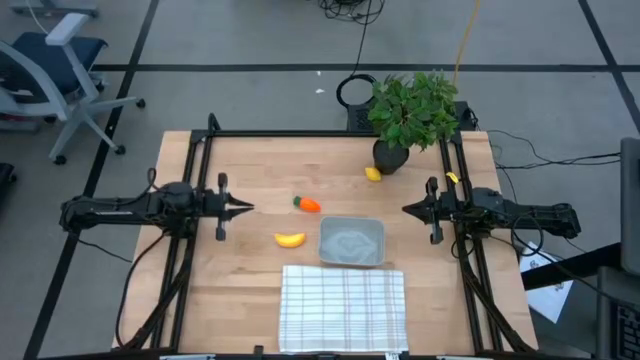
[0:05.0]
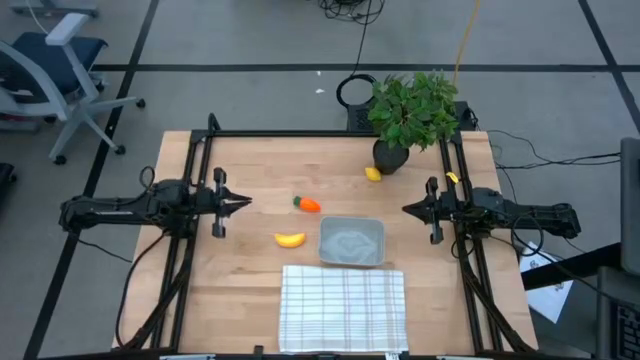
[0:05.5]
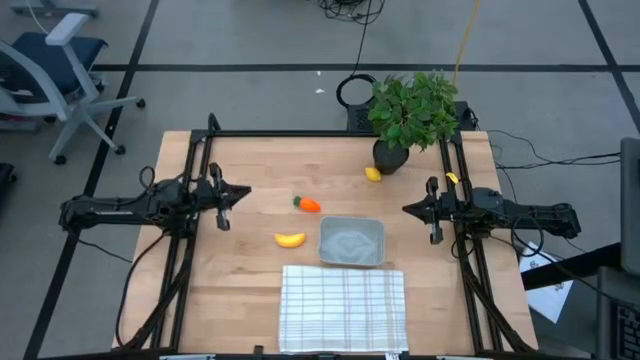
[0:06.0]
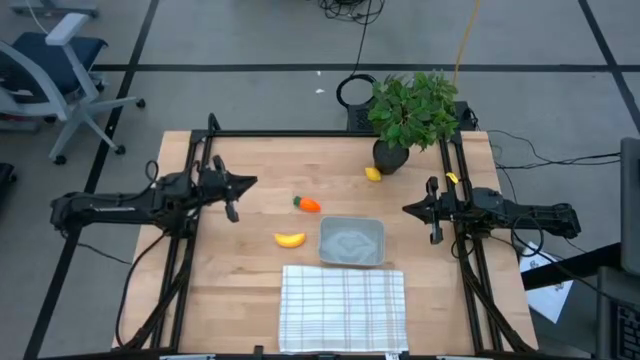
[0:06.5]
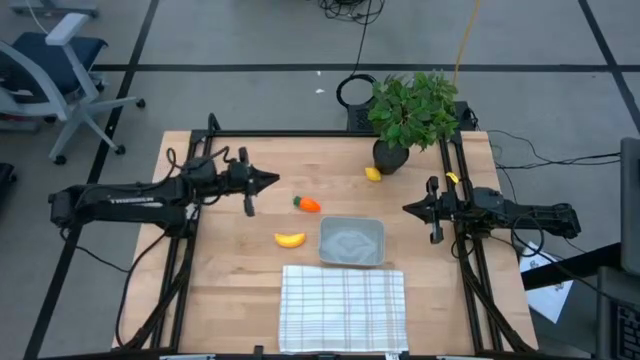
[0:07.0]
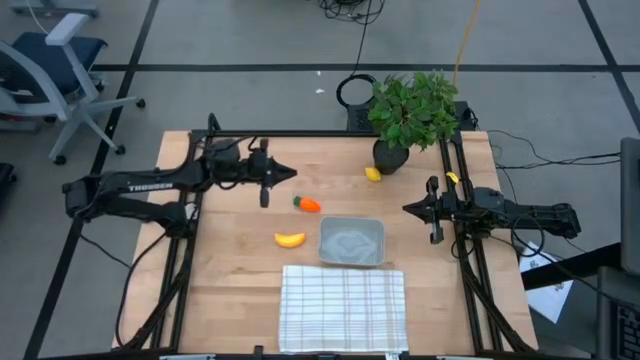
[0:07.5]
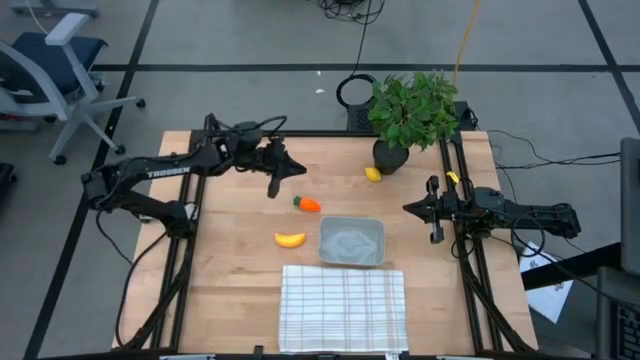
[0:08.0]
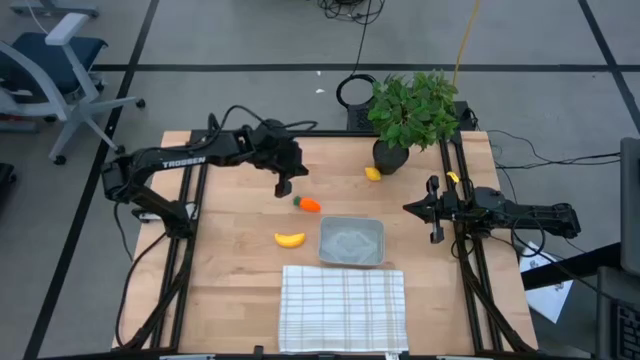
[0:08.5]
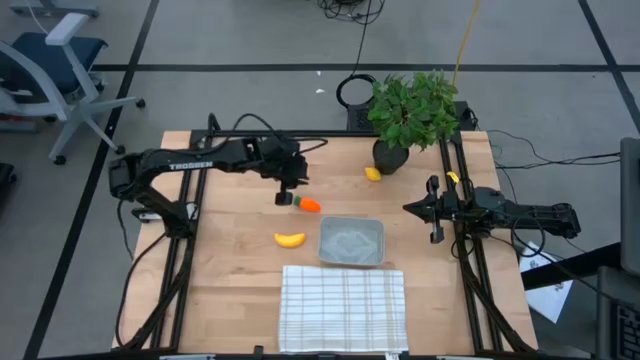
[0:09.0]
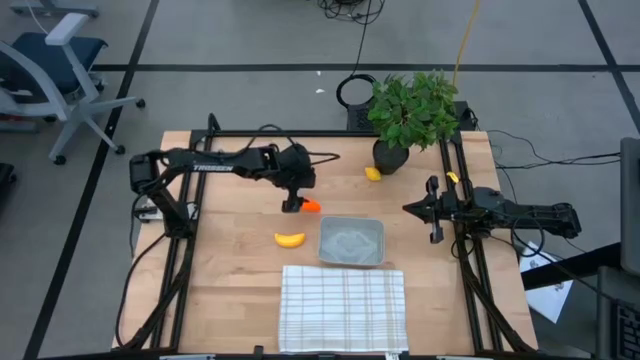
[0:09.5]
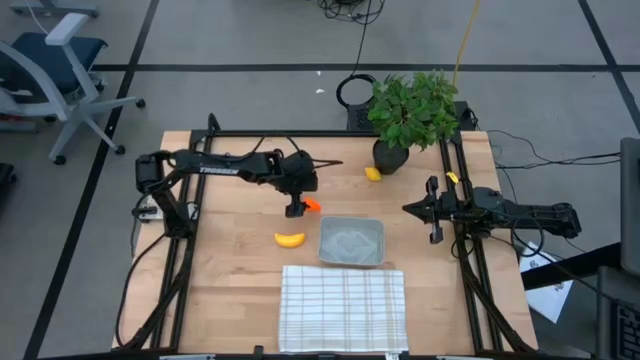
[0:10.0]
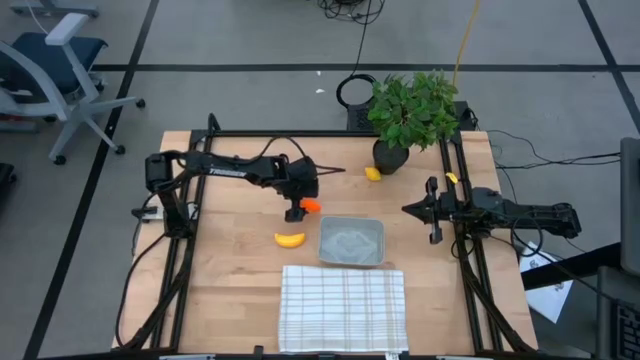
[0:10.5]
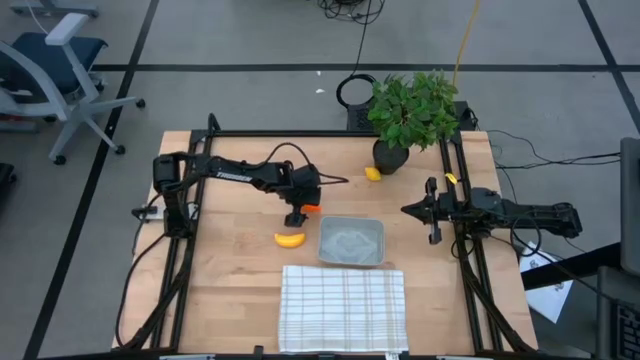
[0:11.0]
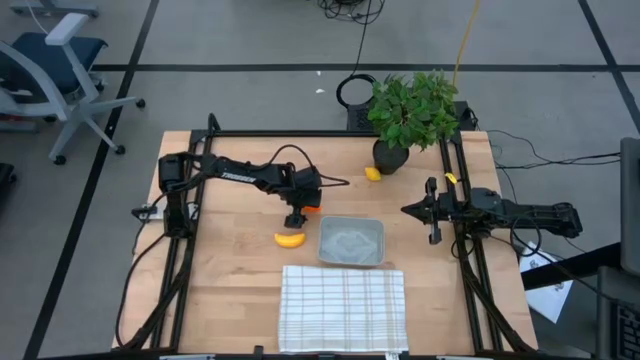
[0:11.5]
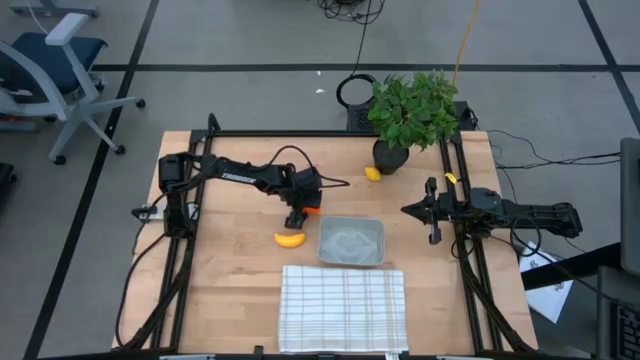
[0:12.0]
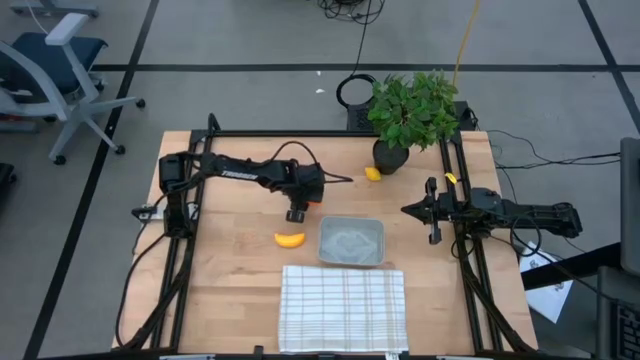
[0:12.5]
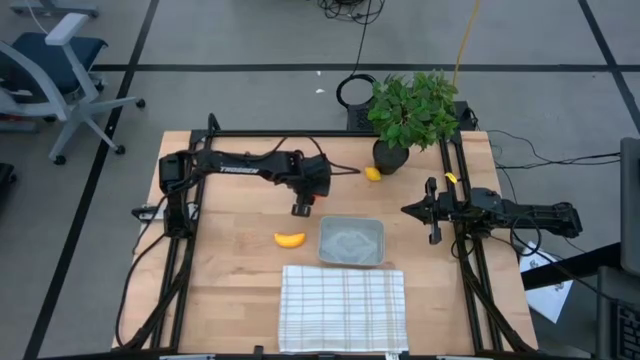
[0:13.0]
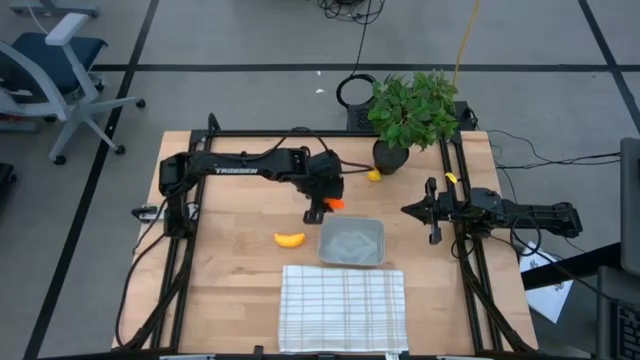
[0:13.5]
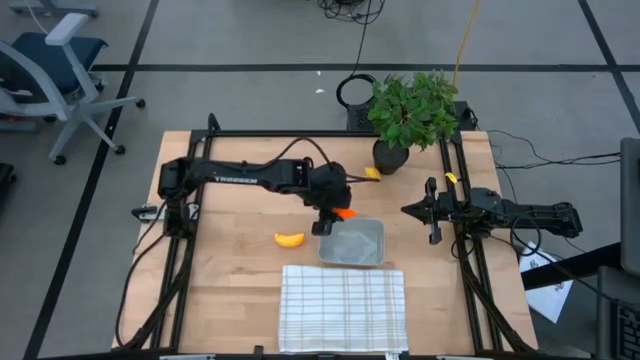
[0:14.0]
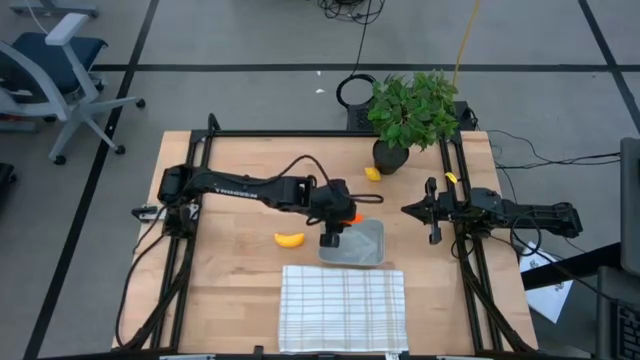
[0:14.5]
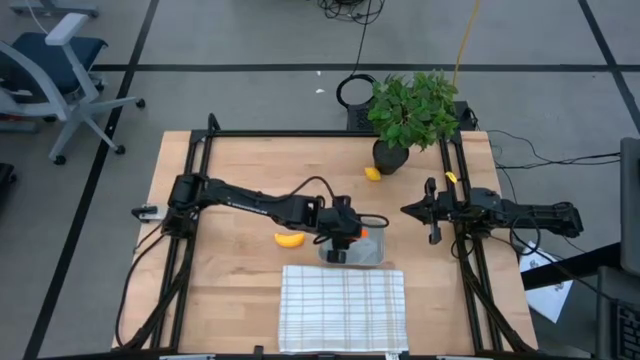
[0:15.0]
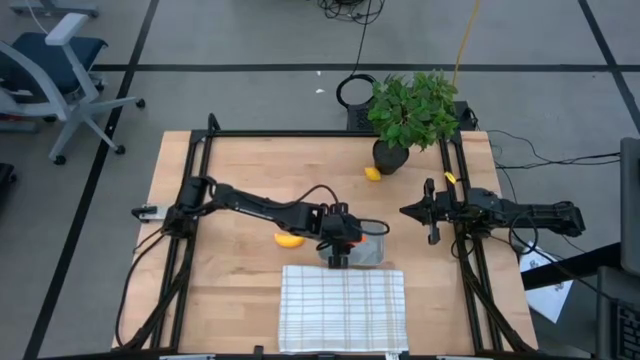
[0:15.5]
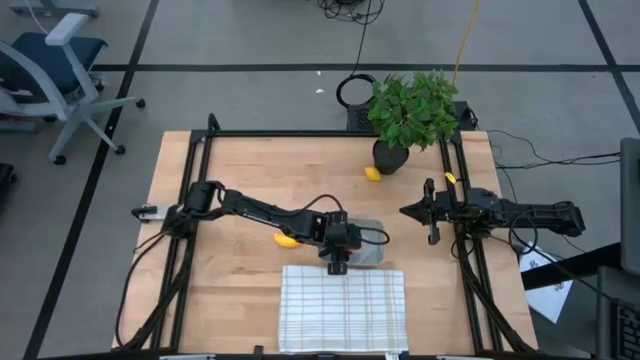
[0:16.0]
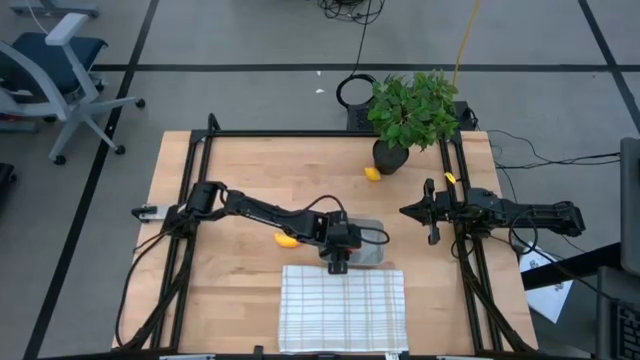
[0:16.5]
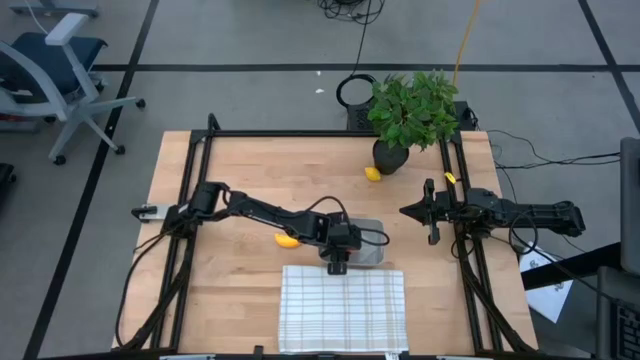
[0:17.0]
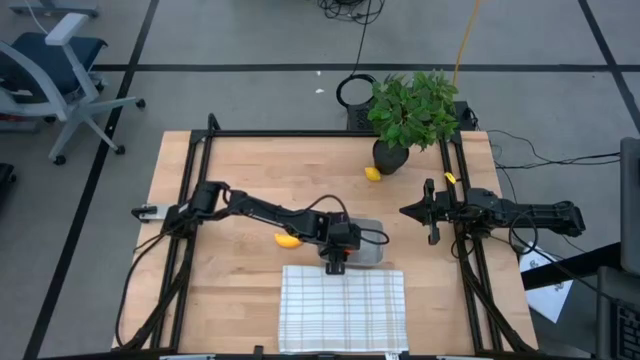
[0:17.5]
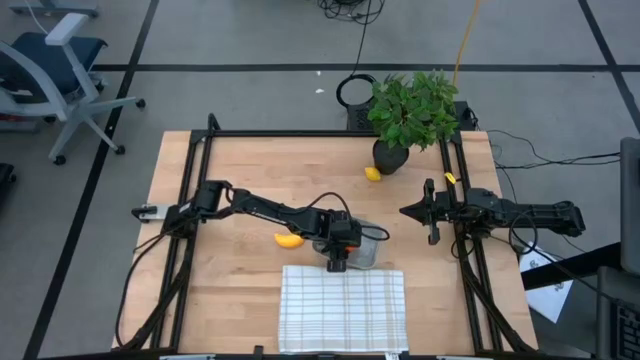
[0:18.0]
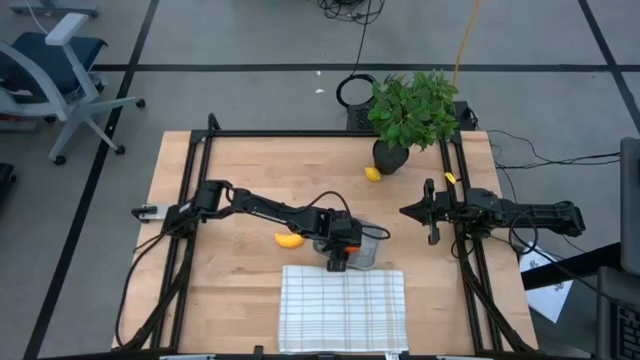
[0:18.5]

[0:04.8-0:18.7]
Task: Pick and placing Produce into tupperware
Put the orange carrot into the gray bin

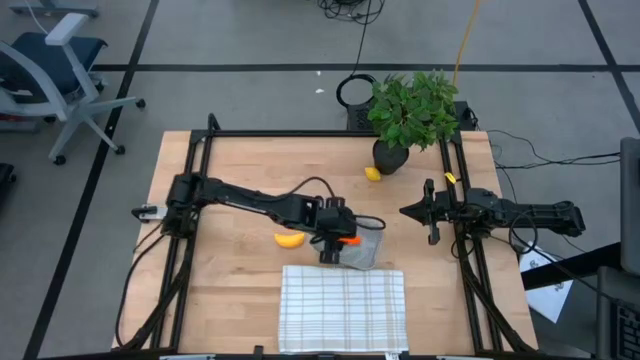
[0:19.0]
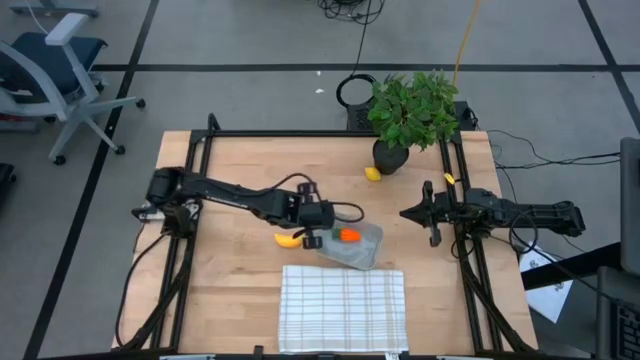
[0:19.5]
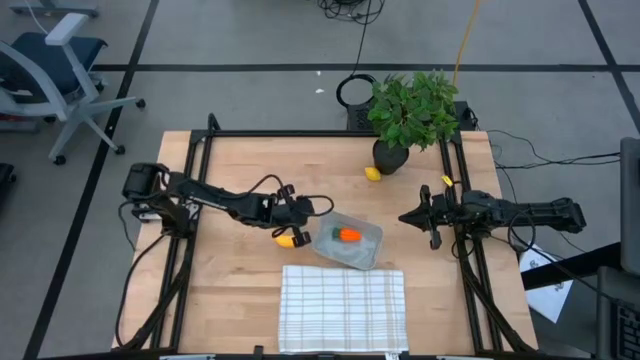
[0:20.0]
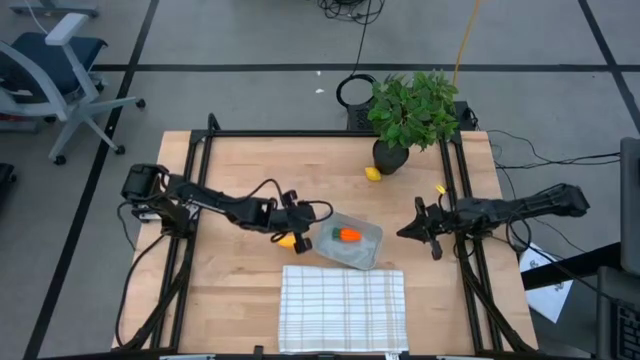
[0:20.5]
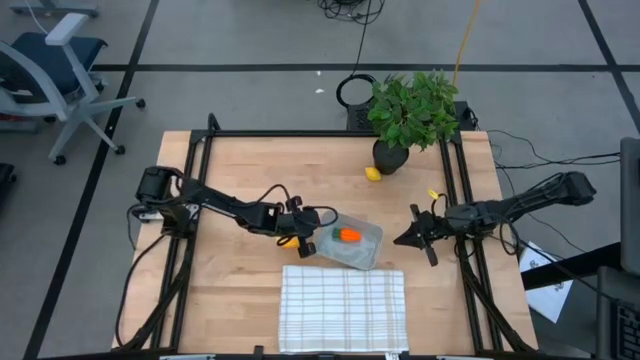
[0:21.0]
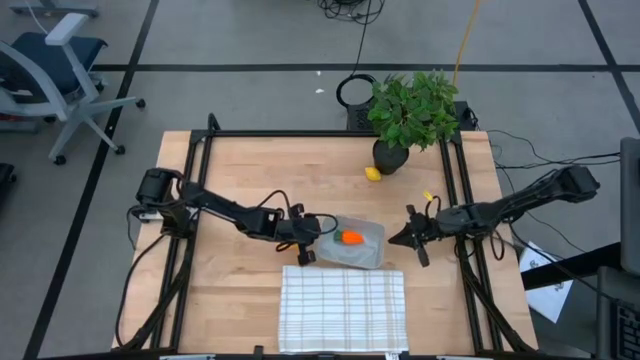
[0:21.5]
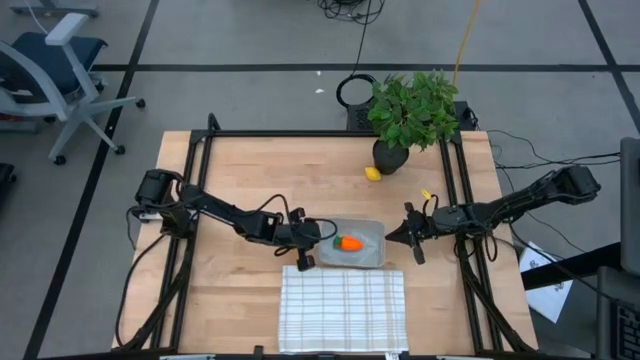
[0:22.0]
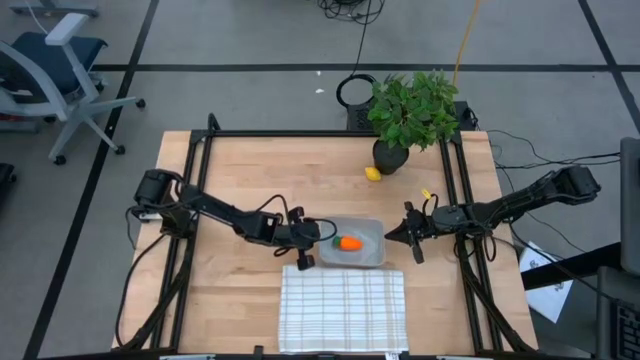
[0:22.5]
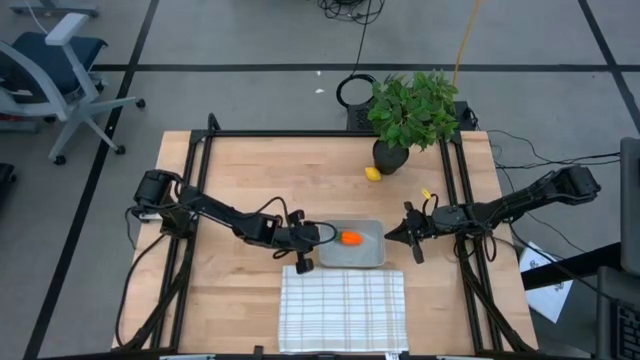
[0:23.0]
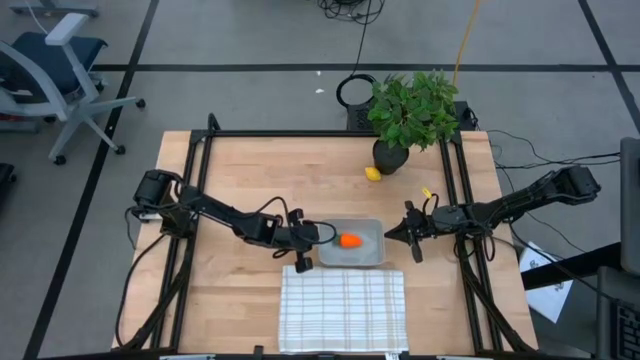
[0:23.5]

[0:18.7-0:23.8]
Adjust the gray bin
